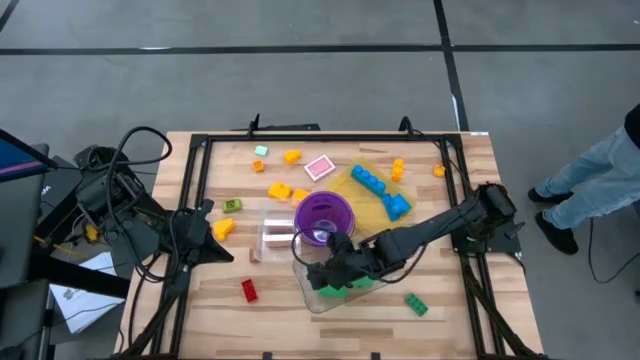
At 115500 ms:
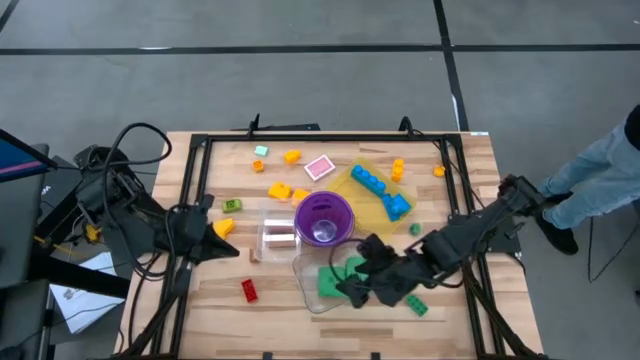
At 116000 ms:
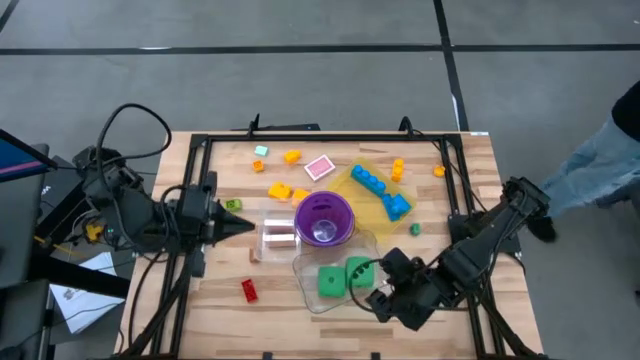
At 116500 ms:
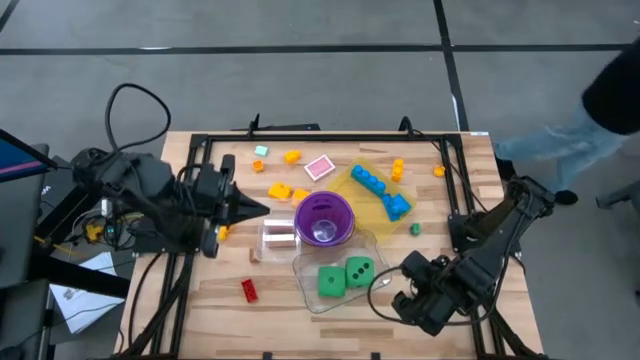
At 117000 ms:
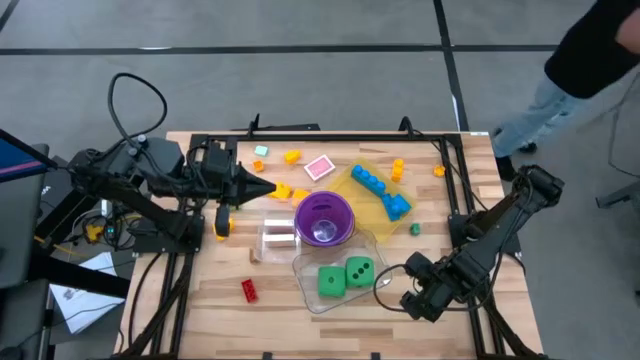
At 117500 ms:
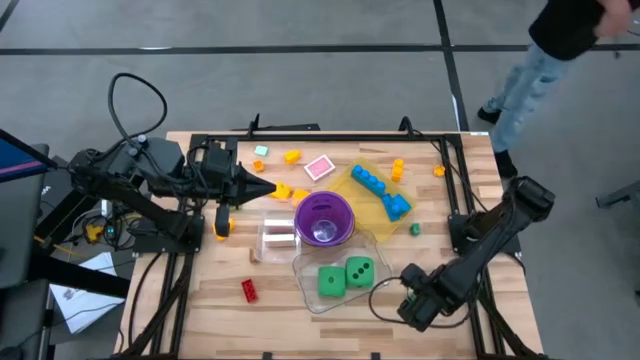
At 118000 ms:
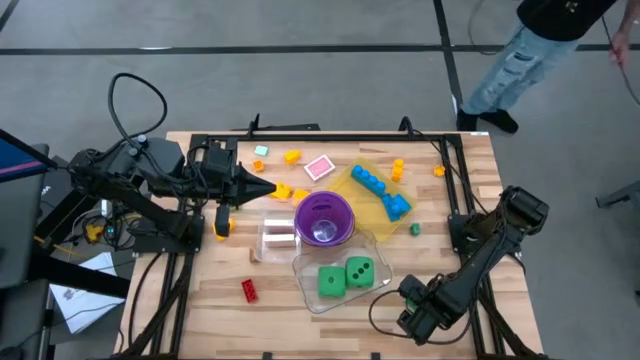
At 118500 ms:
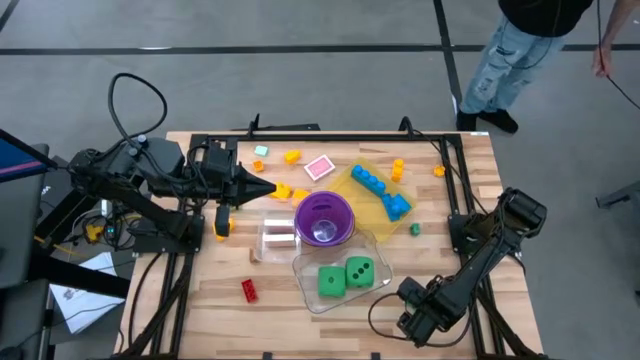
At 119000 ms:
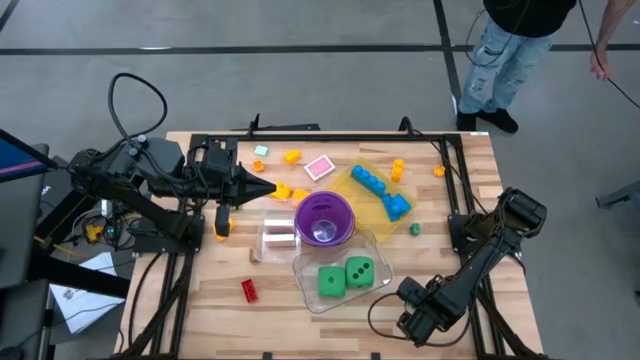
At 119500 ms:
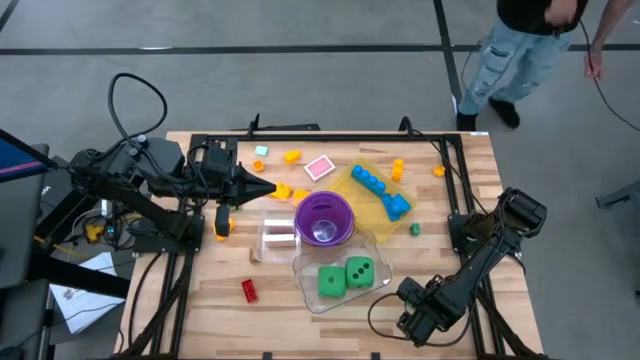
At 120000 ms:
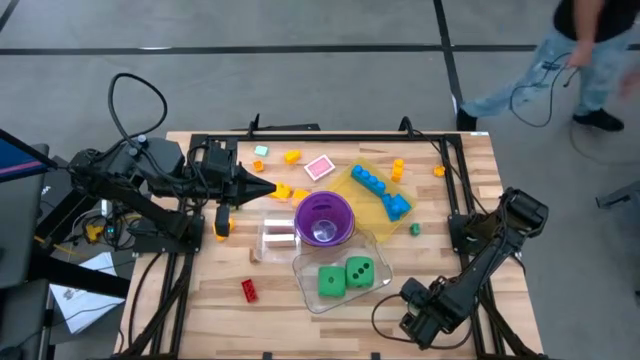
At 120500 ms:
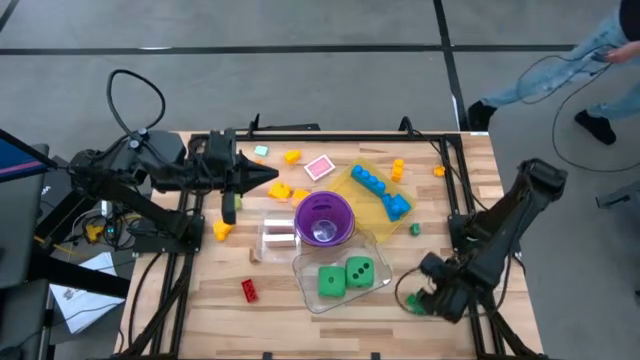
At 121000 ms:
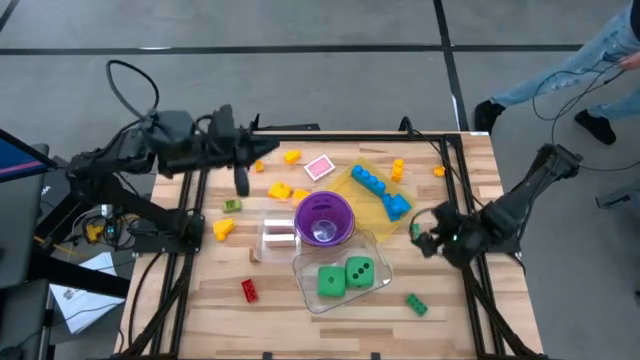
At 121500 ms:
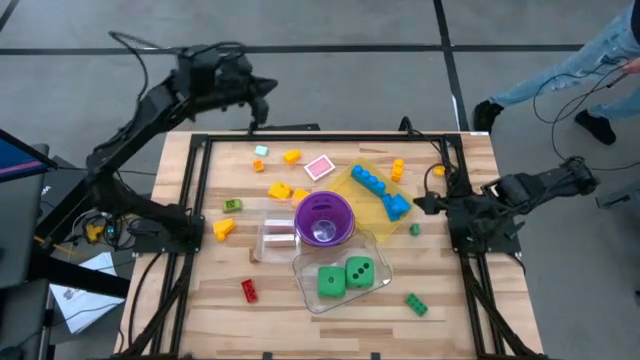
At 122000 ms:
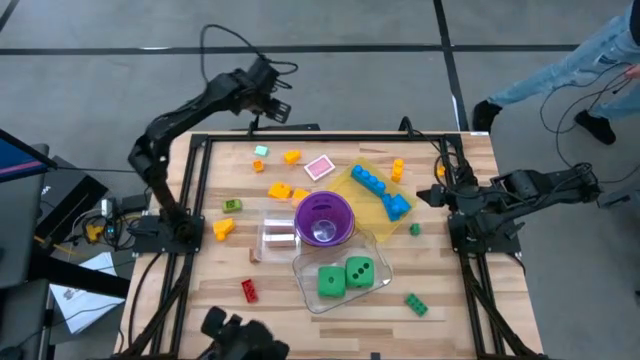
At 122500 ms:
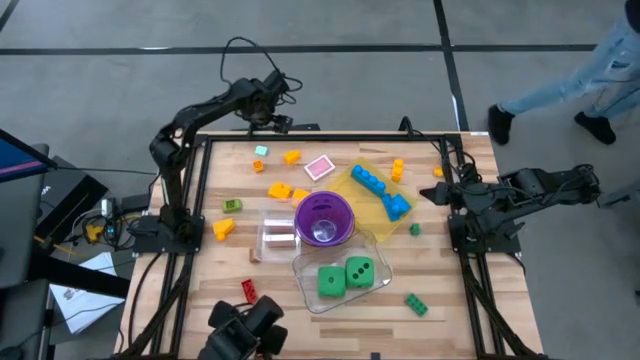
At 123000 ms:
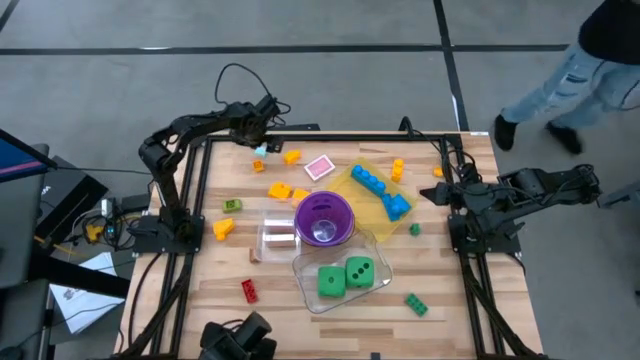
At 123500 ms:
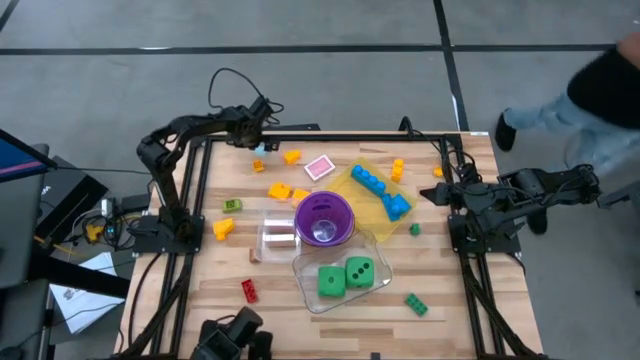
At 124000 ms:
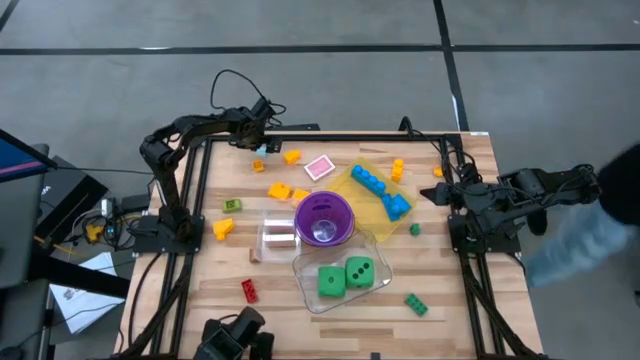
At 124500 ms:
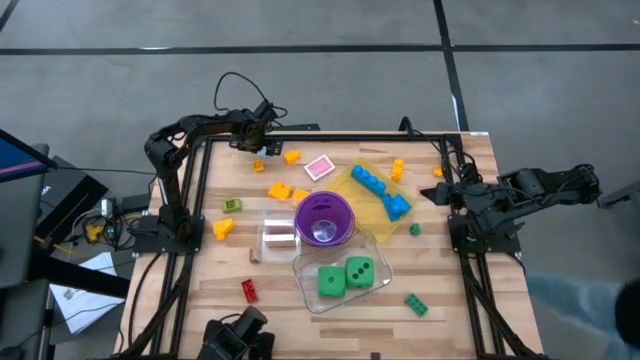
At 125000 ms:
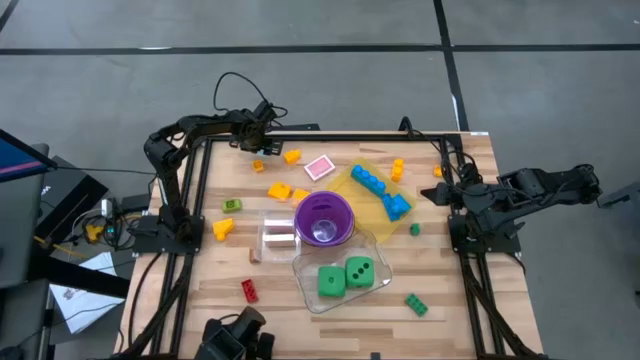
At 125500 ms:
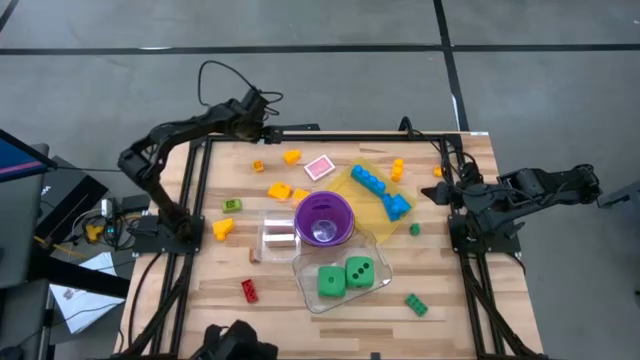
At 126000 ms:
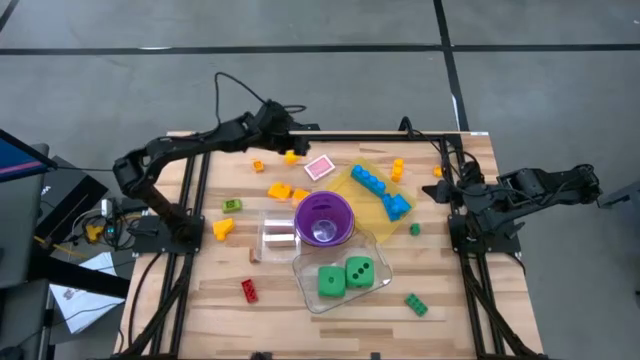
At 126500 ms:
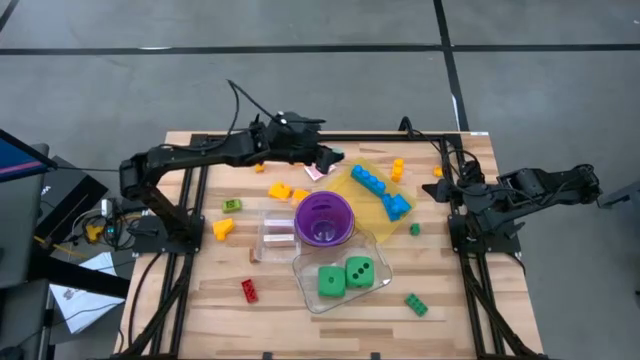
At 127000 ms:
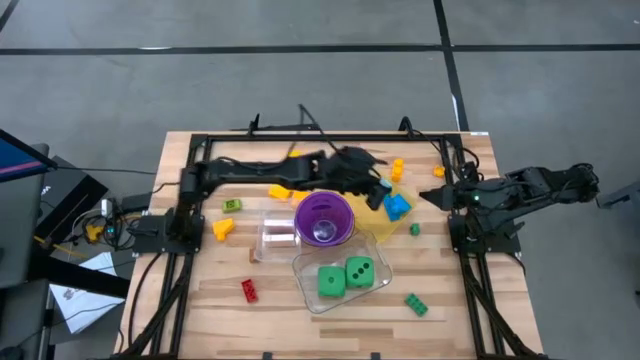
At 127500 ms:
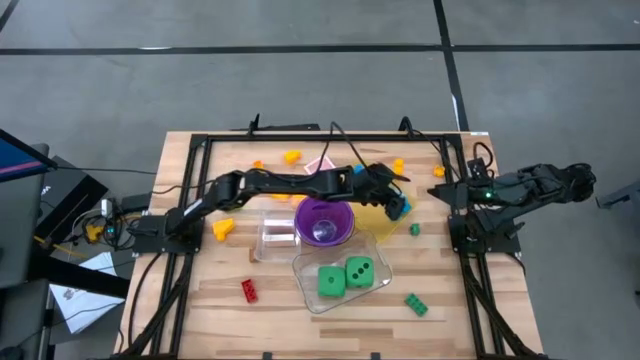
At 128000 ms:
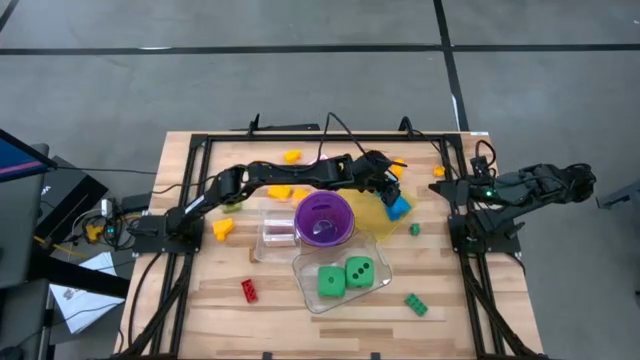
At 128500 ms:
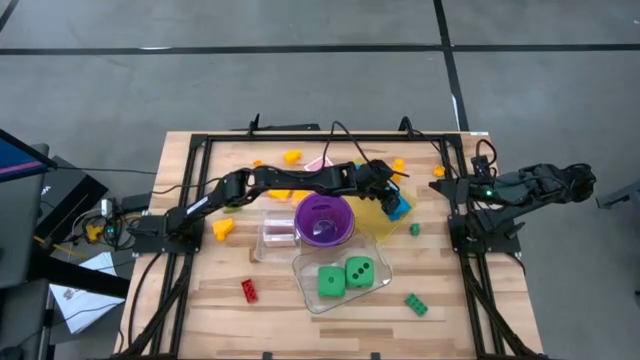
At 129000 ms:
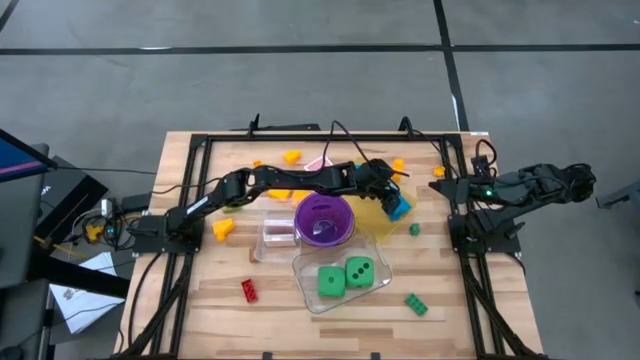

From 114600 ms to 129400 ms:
Task: Pick & Place Toys
Put the small light blue game piece into the yellow bin

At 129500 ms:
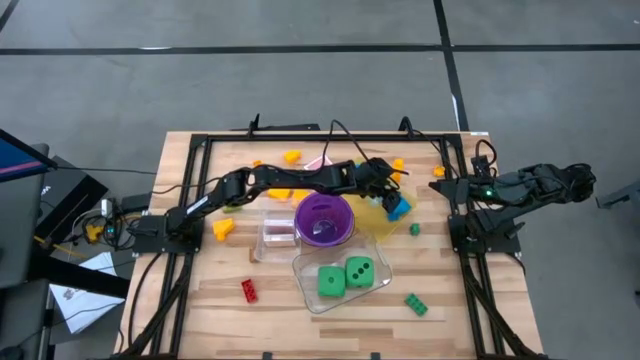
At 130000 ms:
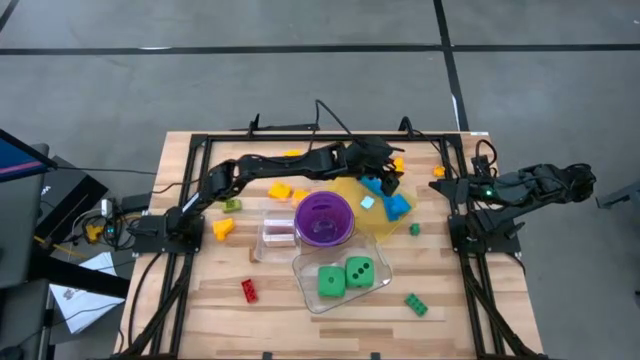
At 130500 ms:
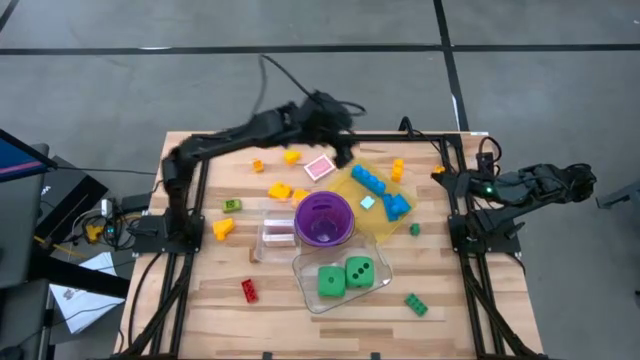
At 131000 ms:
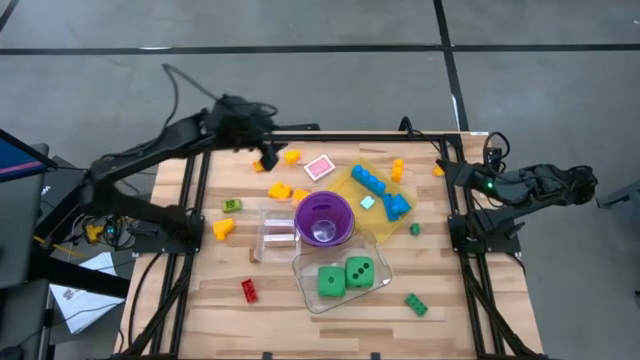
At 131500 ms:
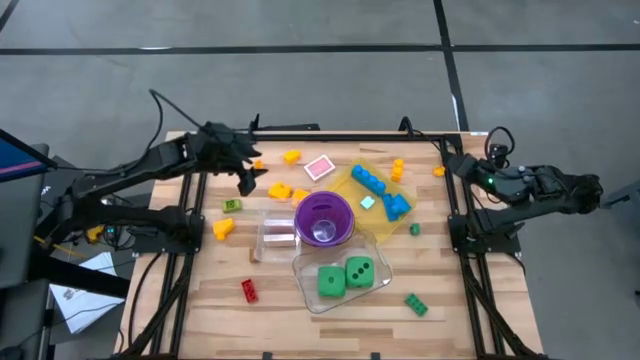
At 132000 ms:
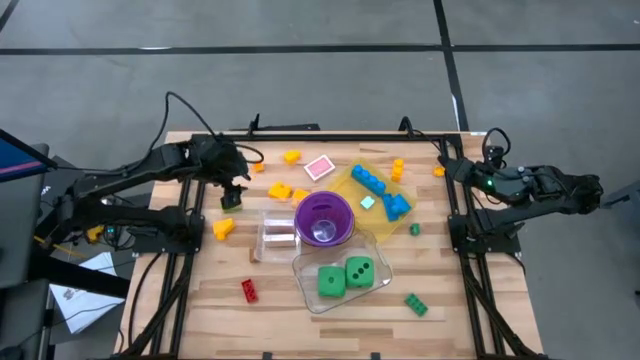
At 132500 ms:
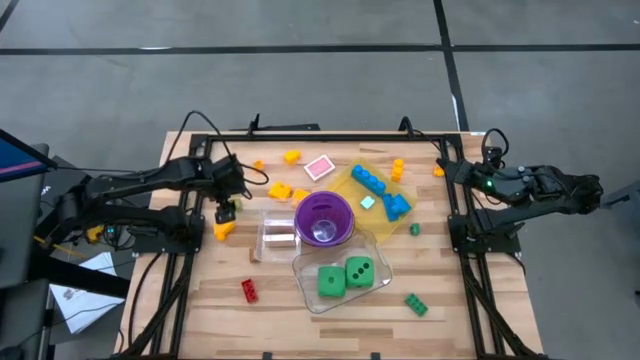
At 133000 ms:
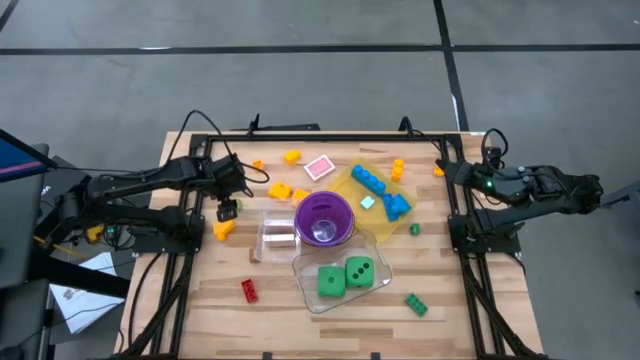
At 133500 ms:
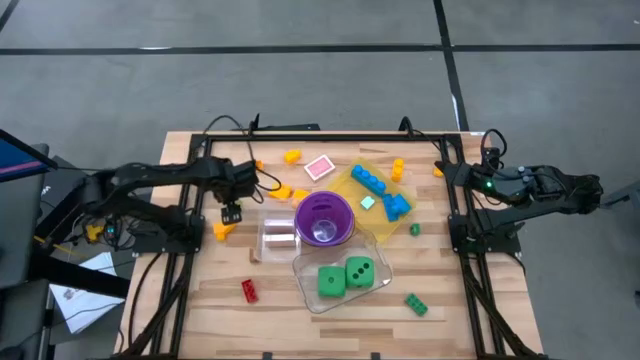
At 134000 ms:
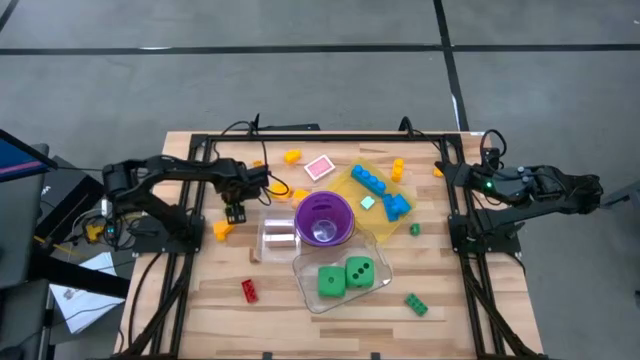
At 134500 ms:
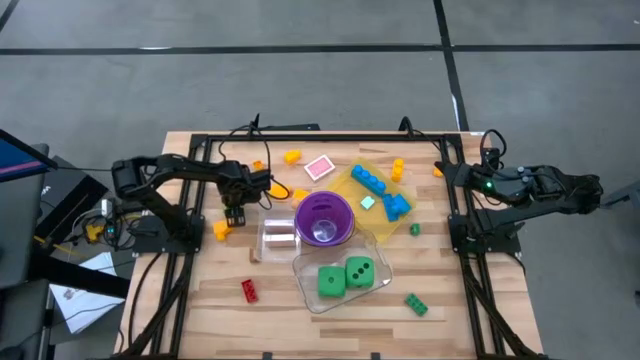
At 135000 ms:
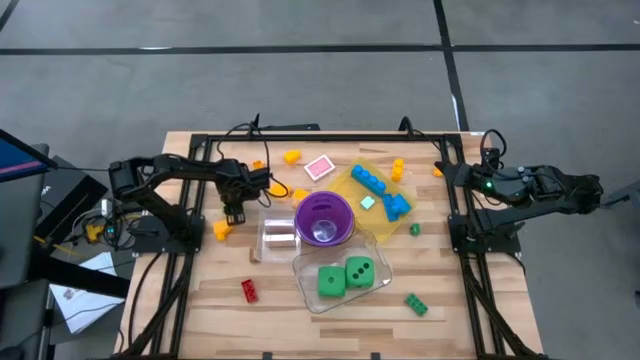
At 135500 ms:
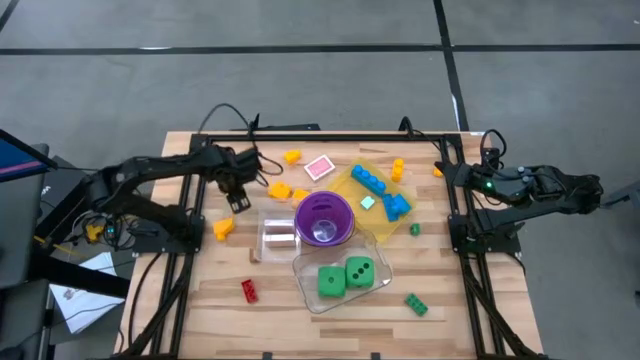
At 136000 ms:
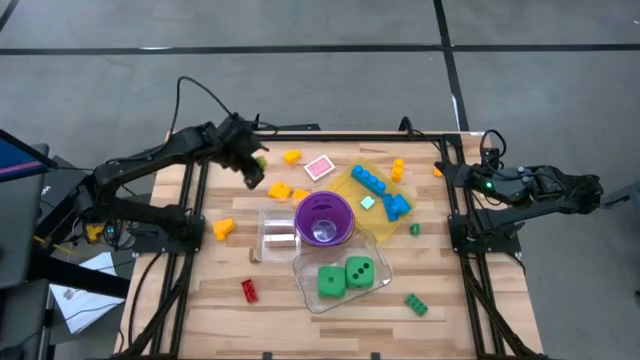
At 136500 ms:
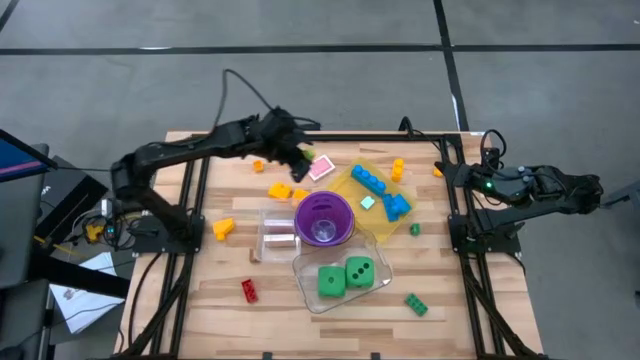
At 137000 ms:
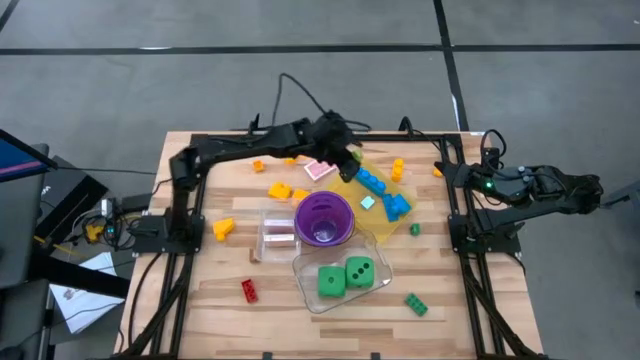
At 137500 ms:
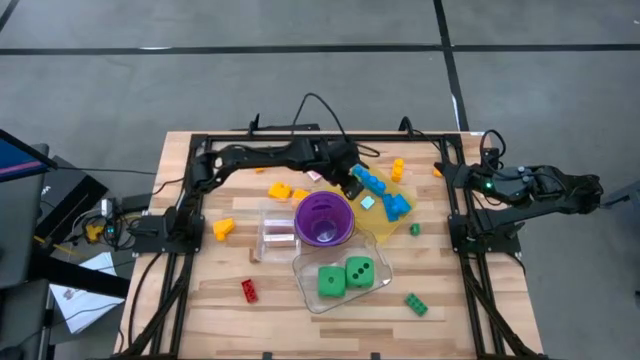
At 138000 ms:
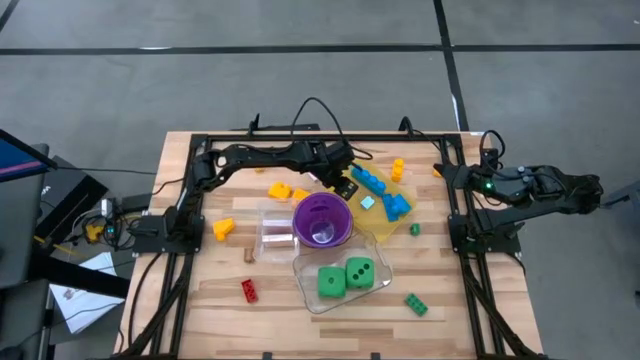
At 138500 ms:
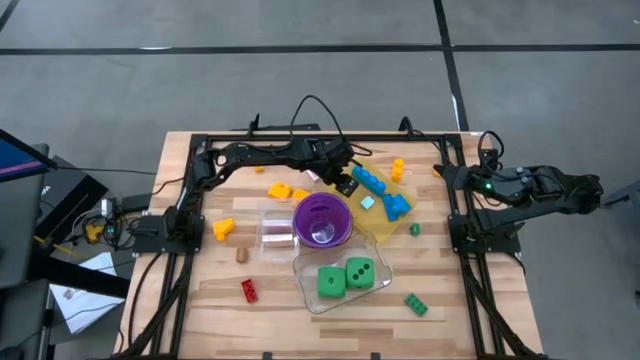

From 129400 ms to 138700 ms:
Put the small green game piece into the yellow bin
